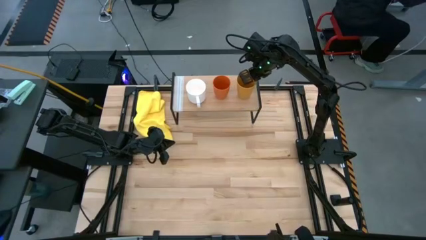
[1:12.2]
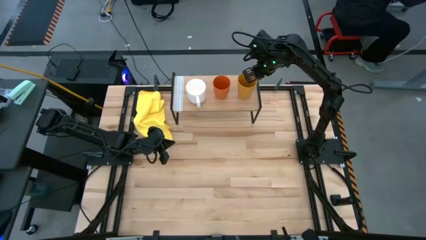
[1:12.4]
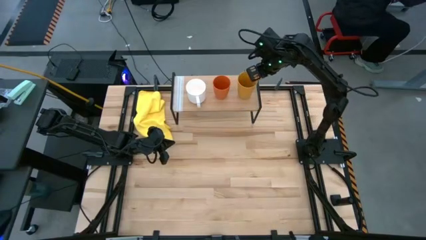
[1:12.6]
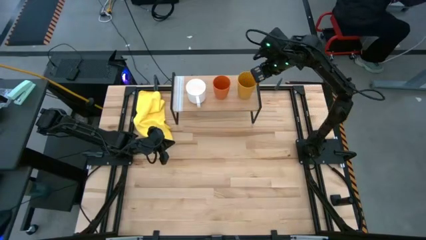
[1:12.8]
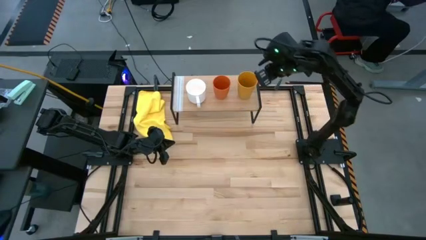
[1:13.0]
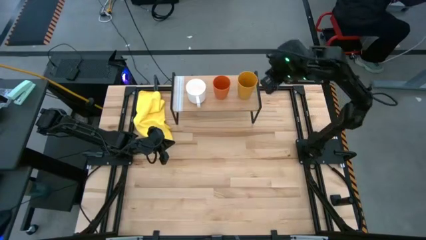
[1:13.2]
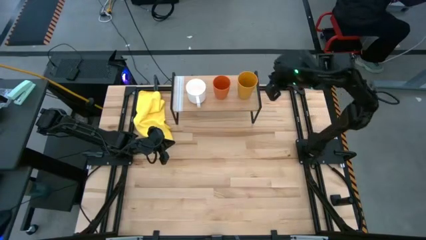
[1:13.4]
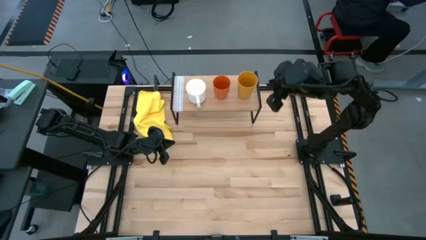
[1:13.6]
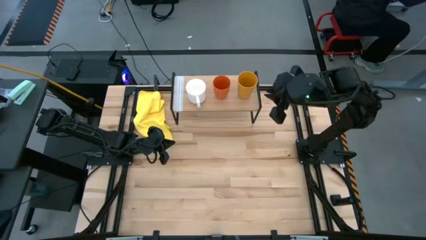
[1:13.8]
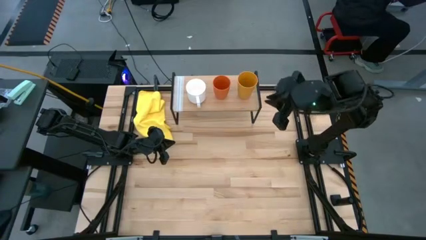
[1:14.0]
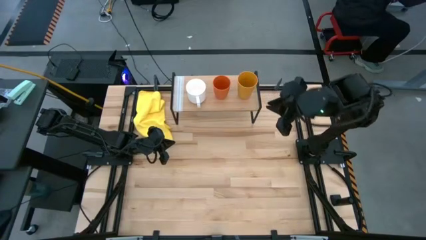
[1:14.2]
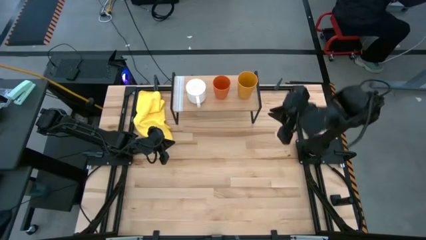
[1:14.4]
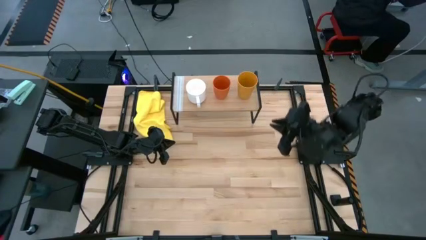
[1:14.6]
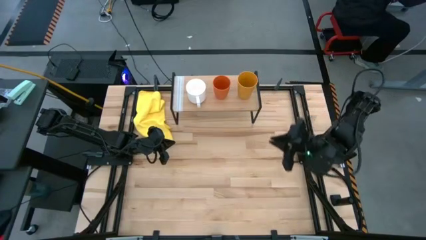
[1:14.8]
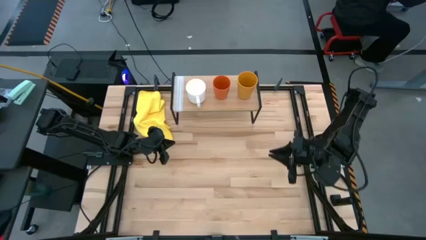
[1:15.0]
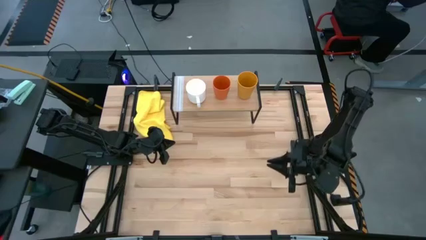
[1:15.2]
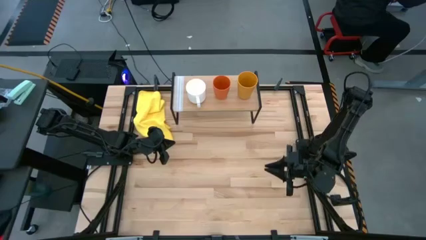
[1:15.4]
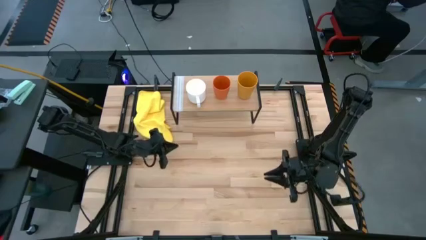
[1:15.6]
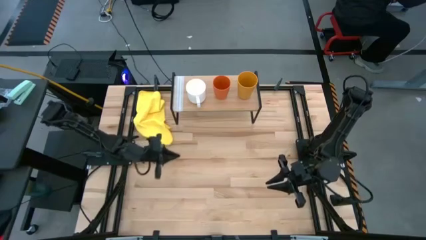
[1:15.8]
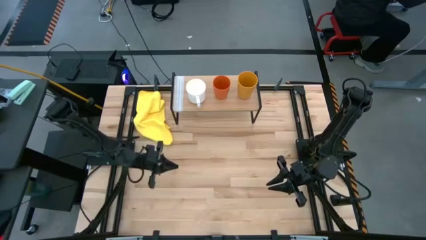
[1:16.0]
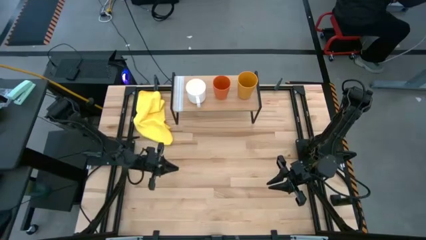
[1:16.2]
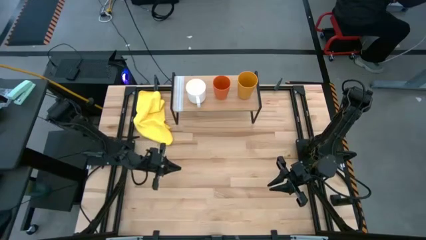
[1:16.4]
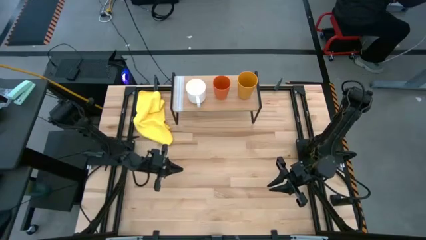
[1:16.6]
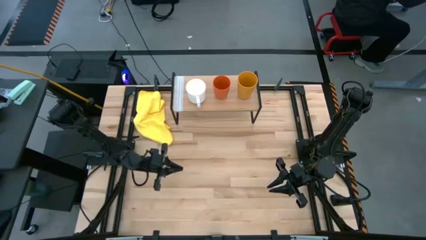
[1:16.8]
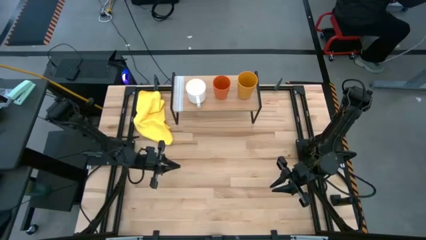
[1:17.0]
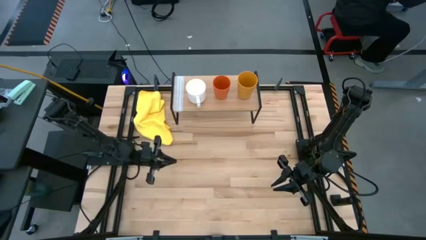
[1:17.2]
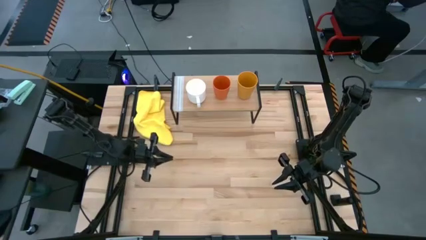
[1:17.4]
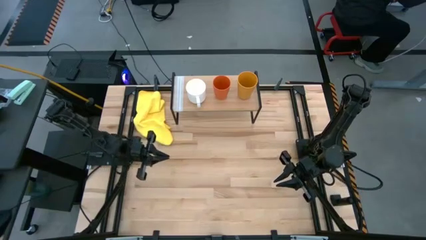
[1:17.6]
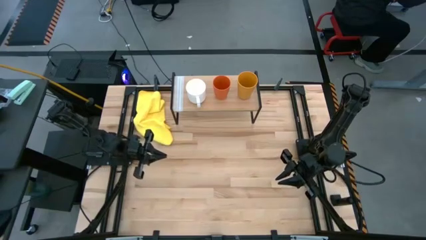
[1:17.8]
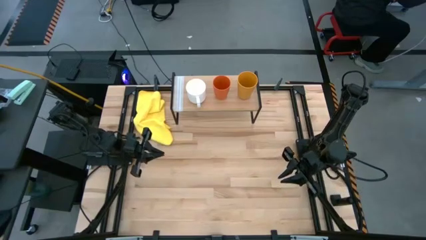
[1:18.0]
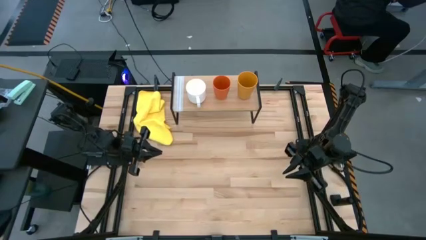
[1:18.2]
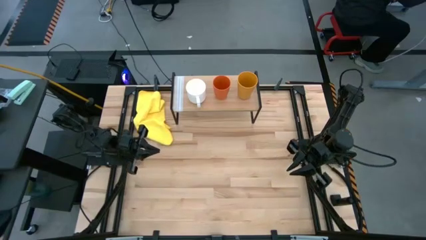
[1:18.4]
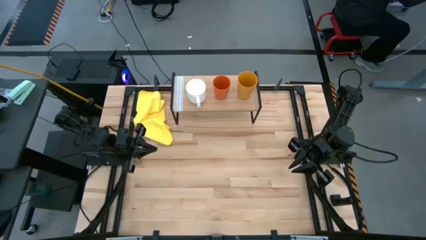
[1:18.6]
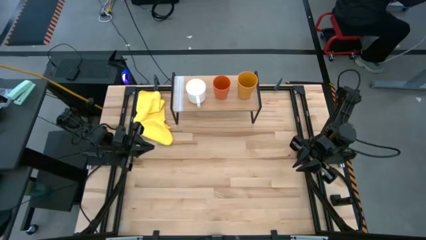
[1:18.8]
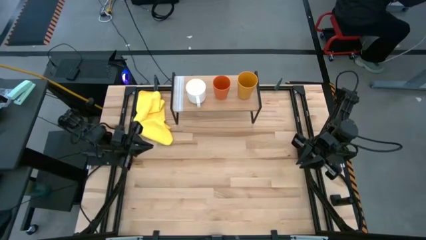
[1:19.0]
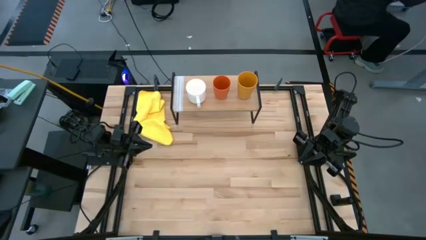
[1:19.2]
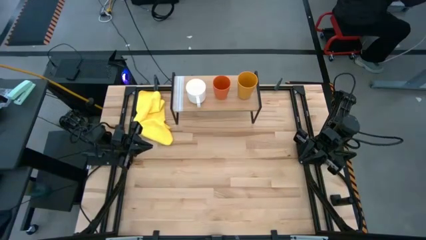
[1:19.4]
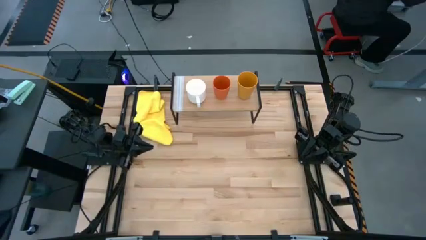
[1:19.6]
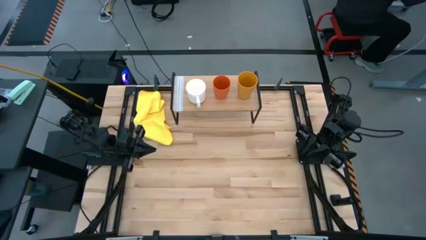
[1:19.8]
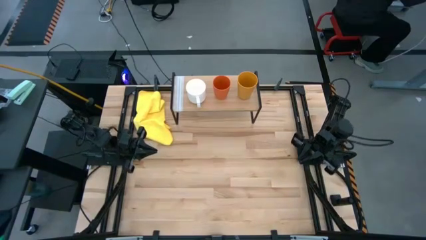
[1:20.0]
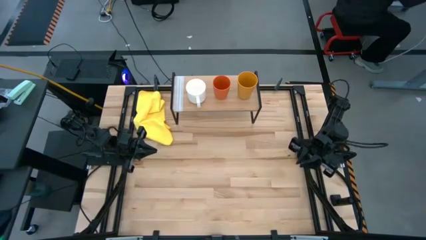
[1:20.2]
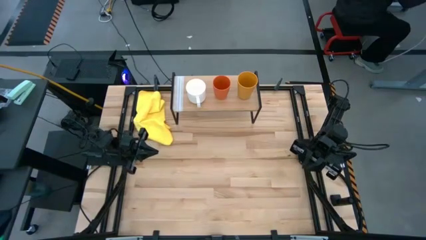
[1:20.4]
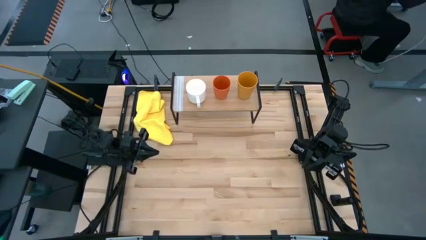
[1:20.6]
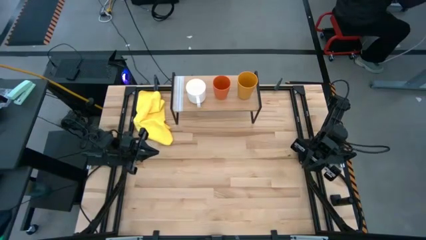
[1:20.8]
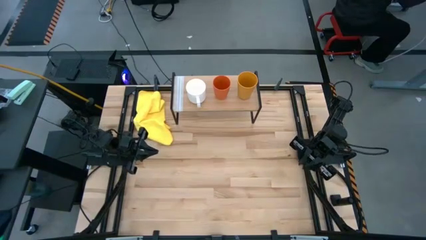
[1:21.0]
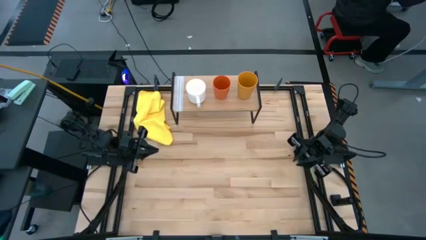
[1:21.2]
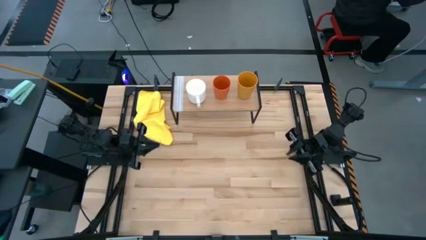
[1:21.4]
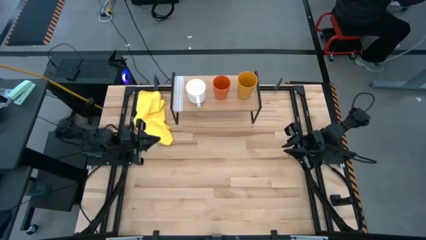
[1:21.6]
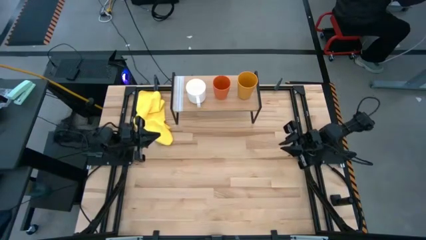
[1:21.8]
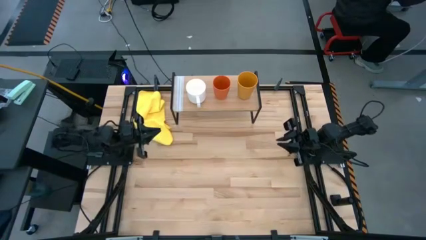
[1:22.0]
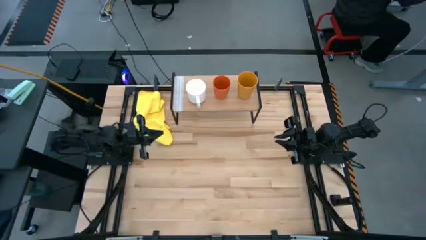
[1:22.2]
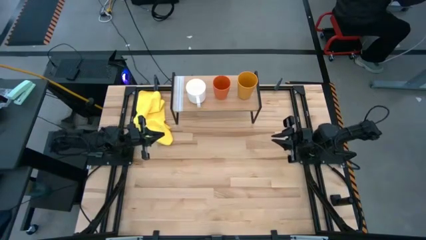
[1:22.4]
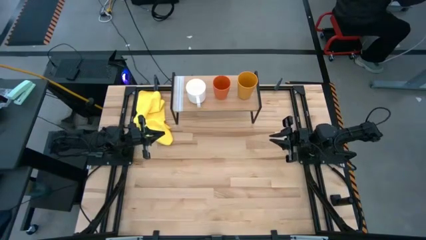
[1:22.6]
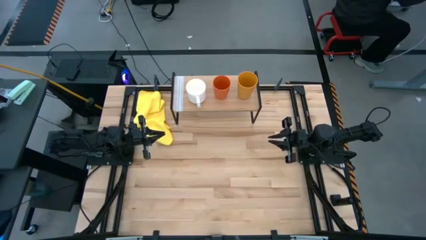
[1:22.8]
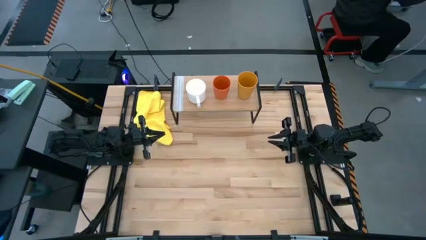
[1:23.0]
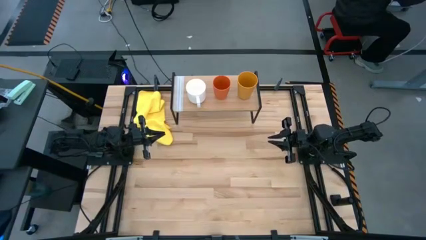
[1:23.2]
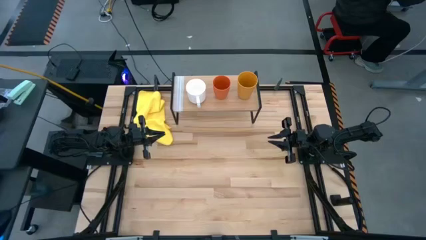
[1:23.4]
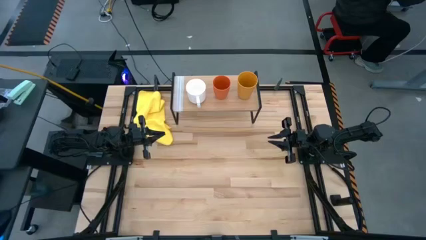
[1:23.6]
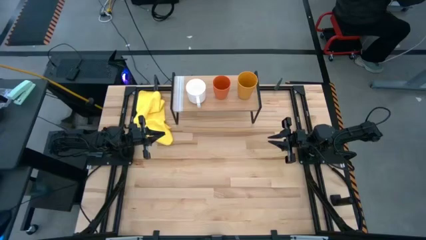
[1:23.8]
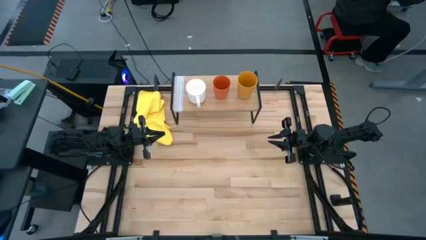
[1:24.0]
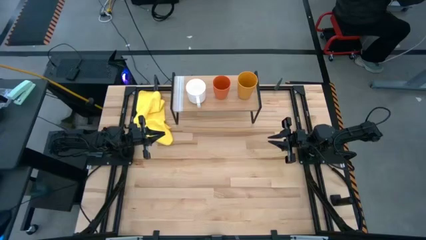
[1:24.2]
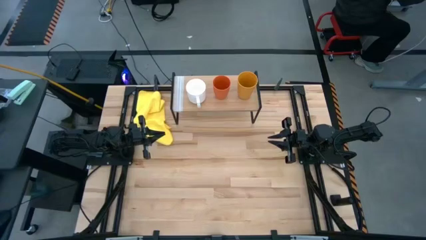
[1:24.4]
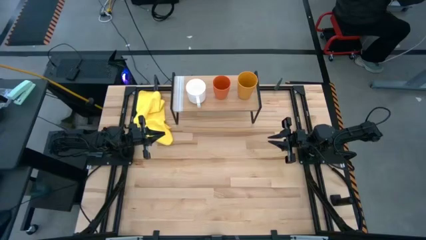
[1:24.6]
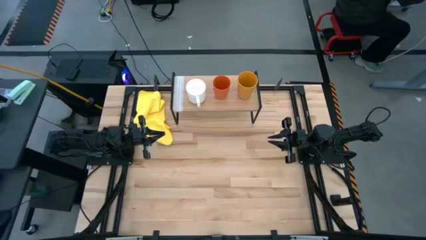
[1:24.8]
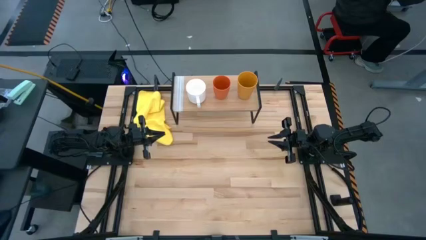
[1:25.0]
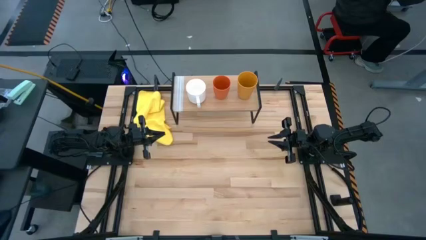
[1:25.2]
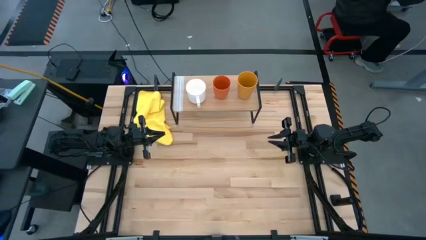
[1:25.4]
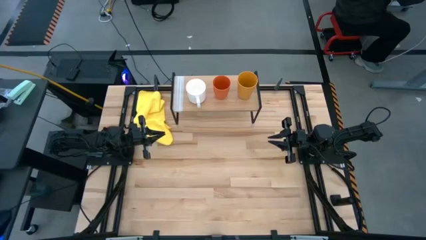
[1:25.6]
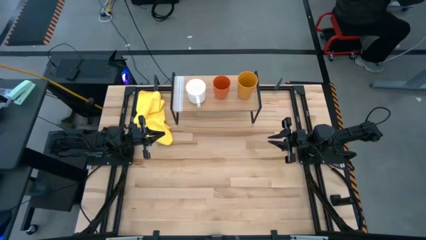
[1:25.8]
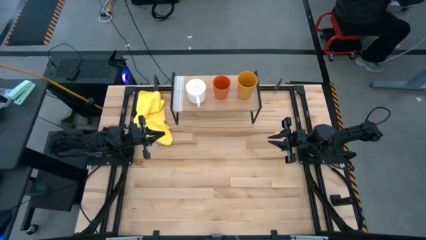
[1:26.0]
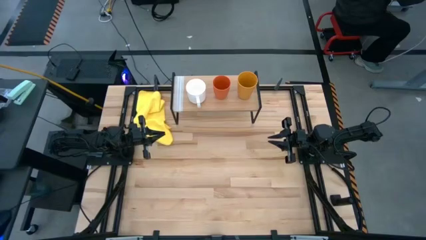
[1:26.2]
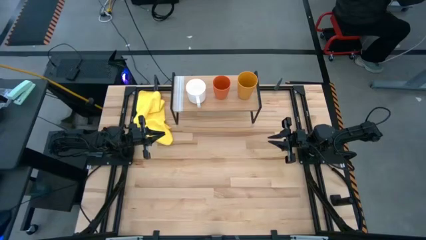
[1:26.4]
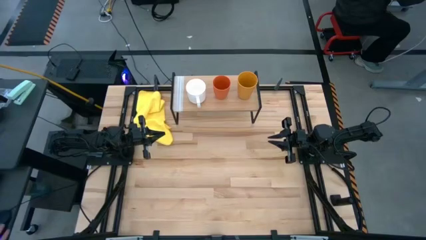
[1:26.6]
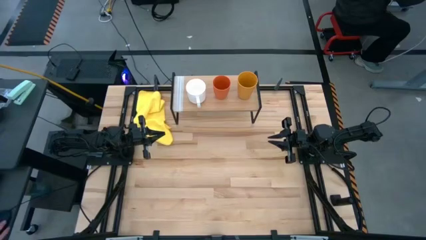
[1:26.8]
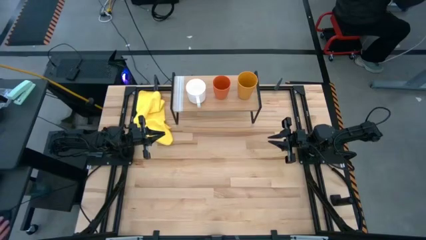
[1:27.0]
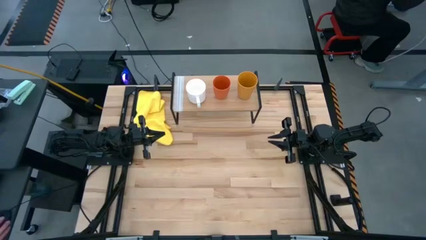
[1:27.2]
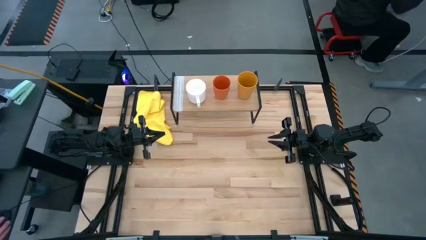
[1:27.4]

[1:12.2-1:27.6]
Task: Stack small to large cups/mugs on shelf
Return to Home Position
